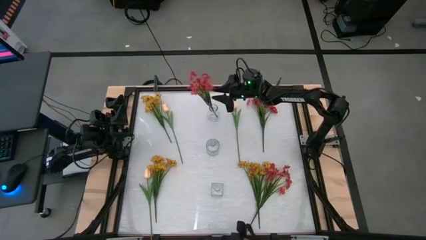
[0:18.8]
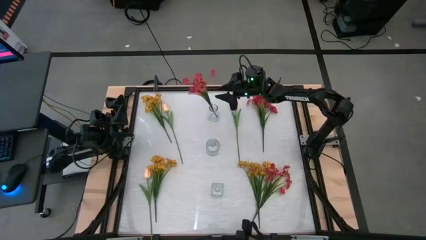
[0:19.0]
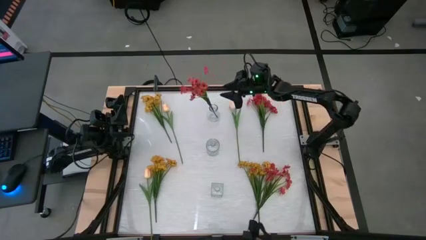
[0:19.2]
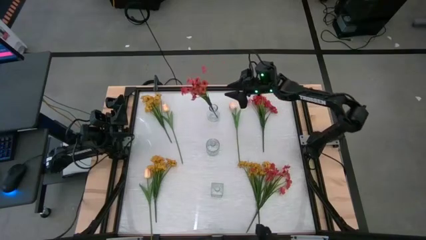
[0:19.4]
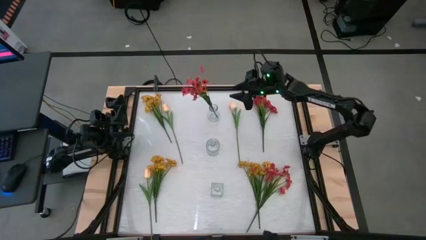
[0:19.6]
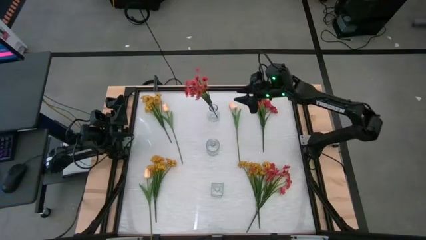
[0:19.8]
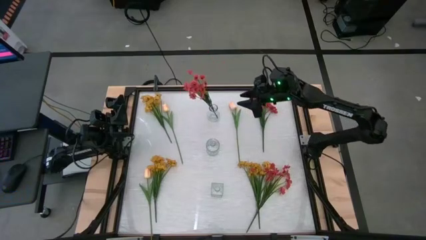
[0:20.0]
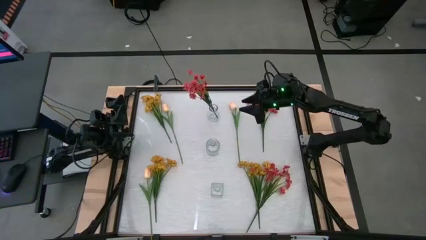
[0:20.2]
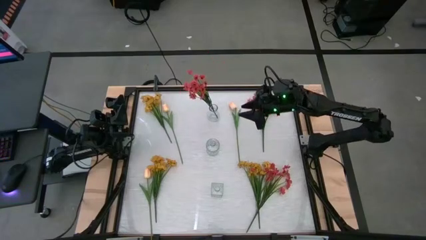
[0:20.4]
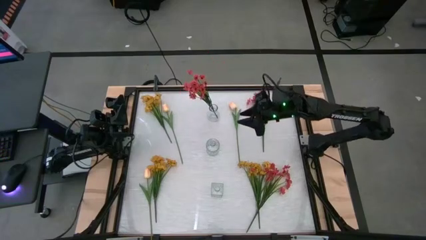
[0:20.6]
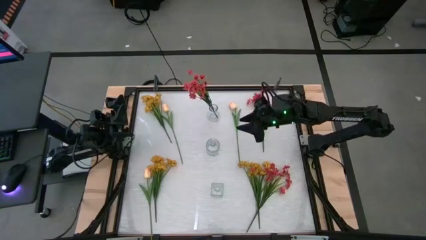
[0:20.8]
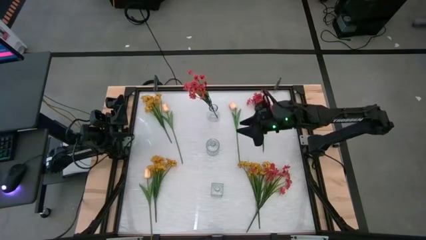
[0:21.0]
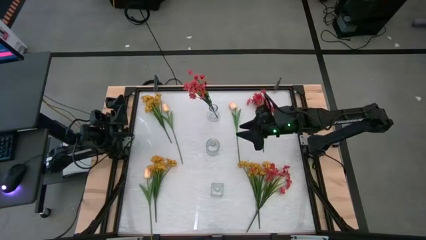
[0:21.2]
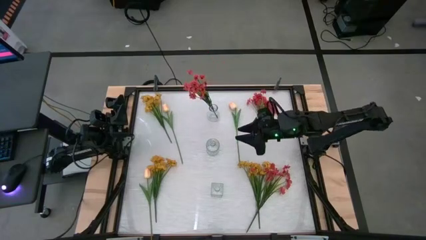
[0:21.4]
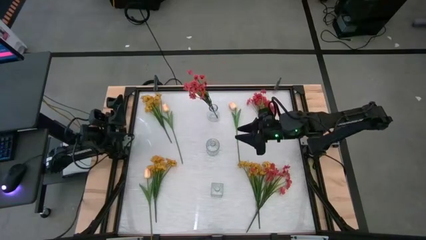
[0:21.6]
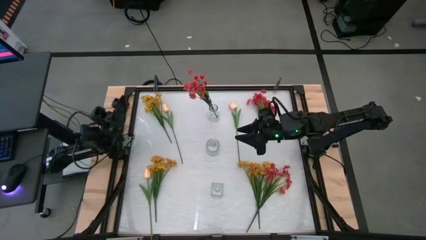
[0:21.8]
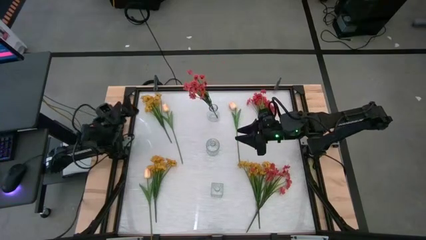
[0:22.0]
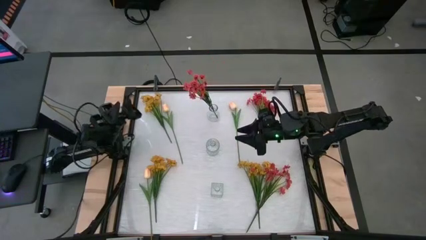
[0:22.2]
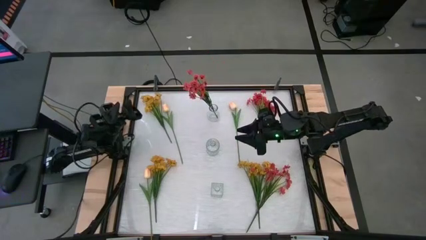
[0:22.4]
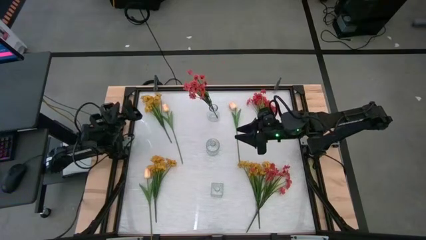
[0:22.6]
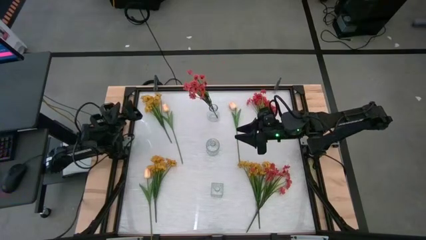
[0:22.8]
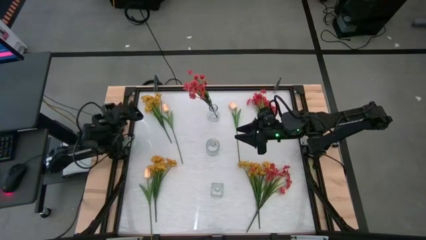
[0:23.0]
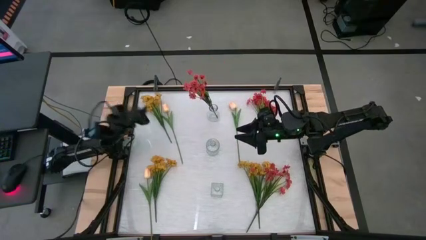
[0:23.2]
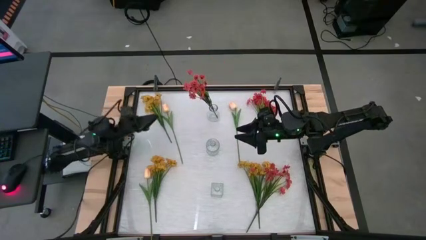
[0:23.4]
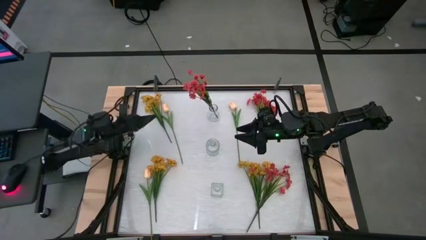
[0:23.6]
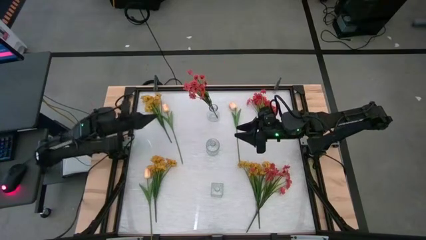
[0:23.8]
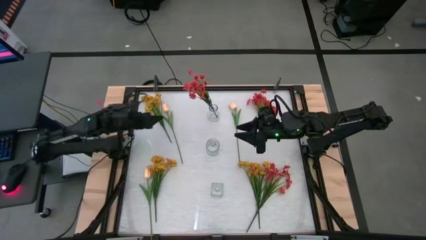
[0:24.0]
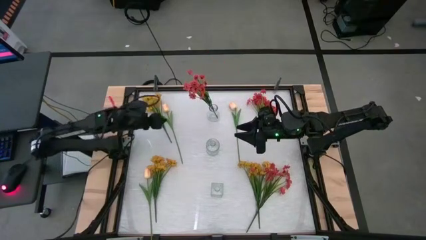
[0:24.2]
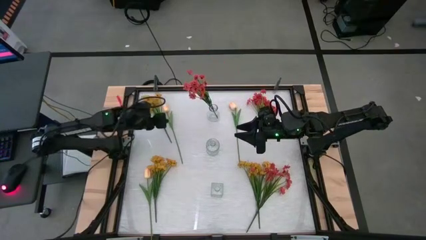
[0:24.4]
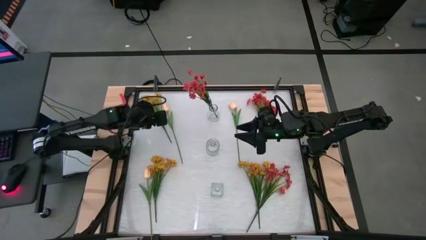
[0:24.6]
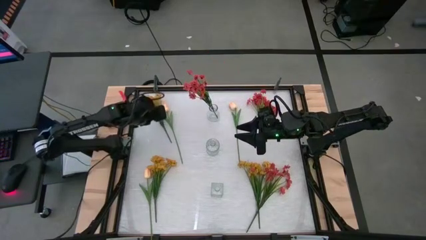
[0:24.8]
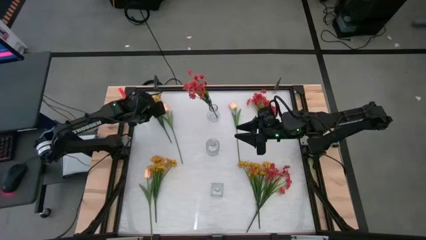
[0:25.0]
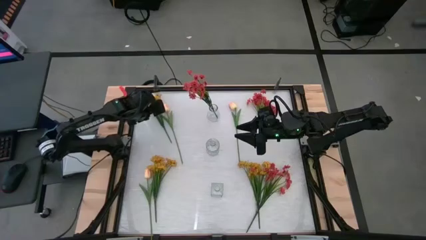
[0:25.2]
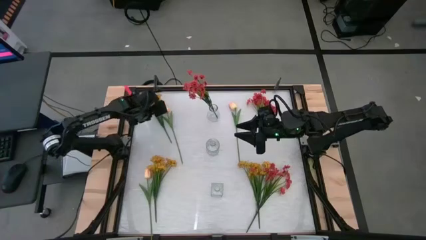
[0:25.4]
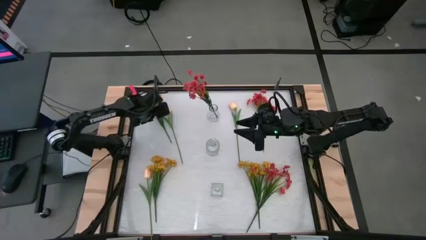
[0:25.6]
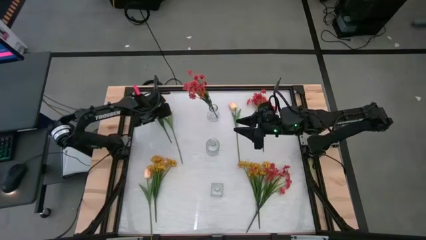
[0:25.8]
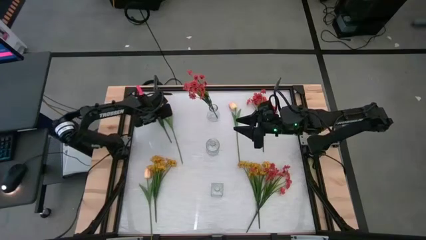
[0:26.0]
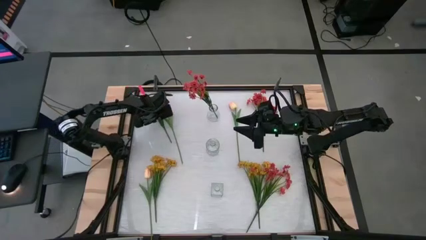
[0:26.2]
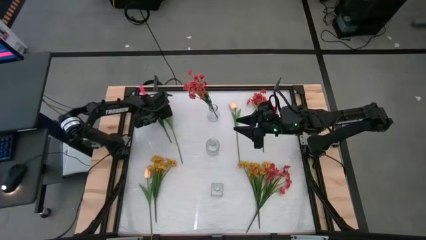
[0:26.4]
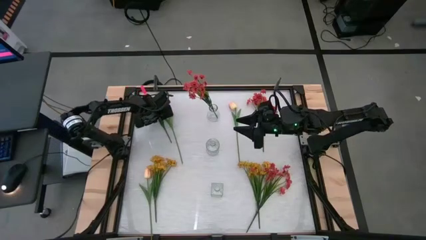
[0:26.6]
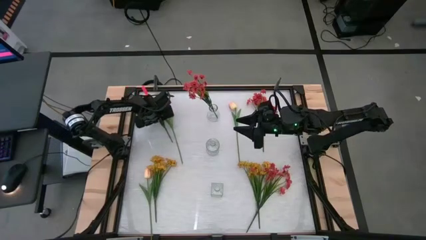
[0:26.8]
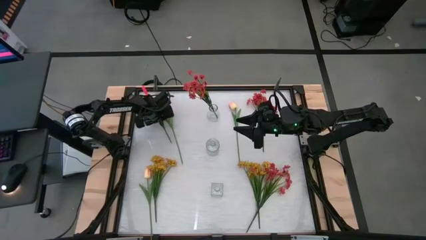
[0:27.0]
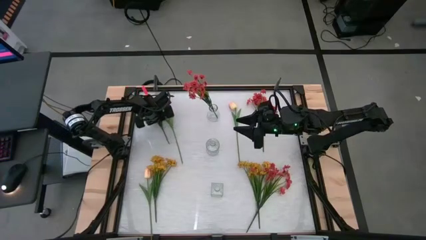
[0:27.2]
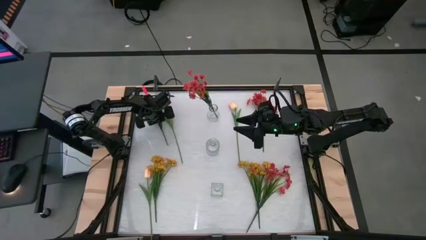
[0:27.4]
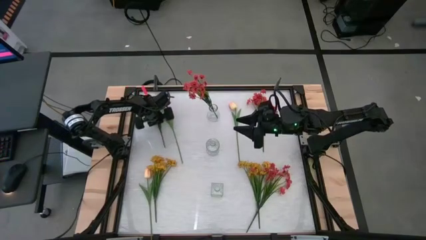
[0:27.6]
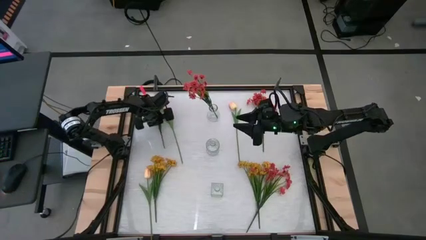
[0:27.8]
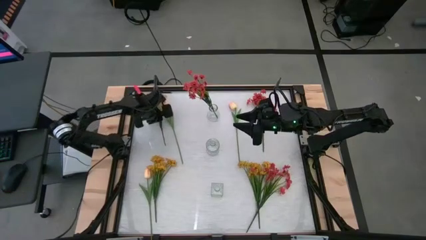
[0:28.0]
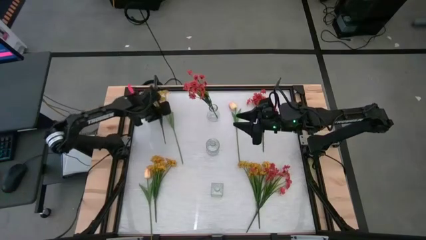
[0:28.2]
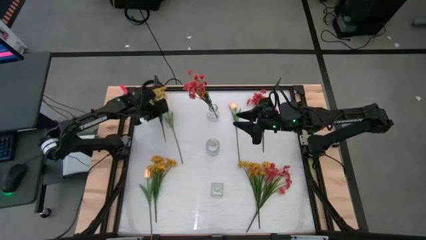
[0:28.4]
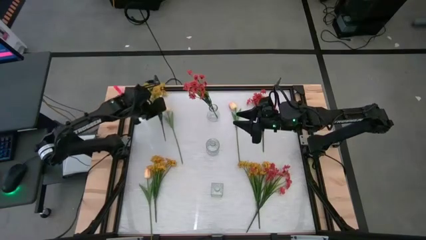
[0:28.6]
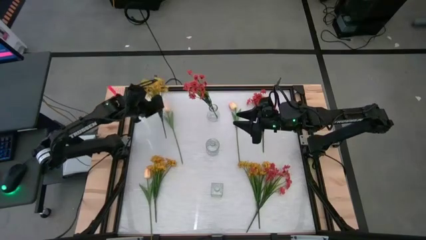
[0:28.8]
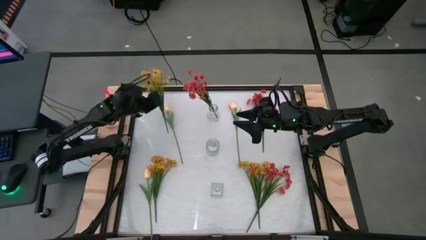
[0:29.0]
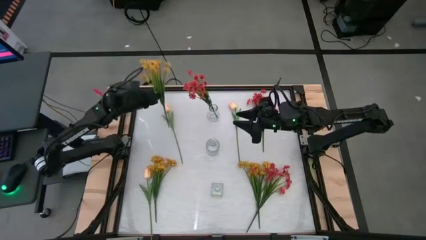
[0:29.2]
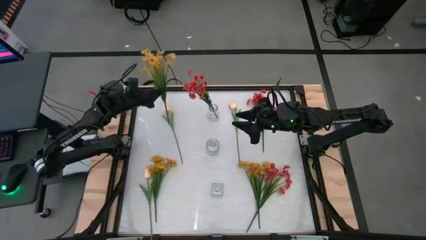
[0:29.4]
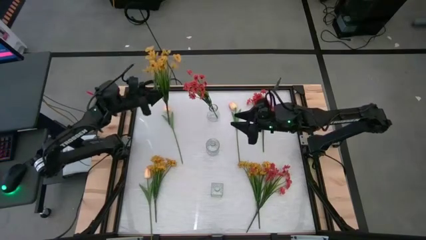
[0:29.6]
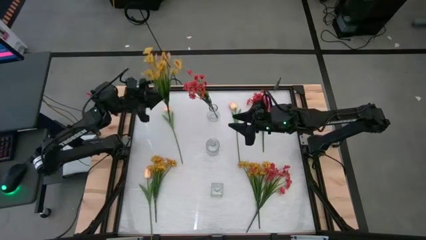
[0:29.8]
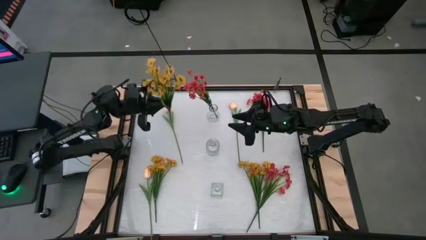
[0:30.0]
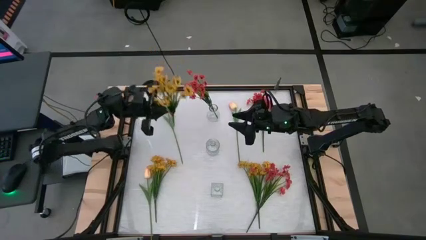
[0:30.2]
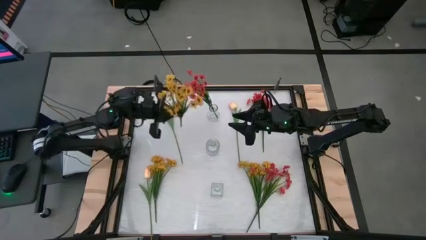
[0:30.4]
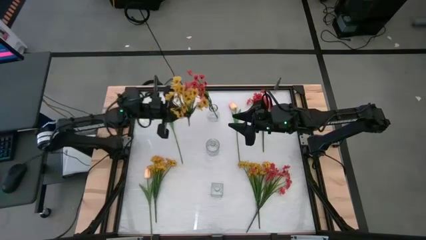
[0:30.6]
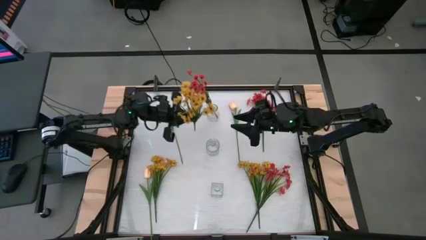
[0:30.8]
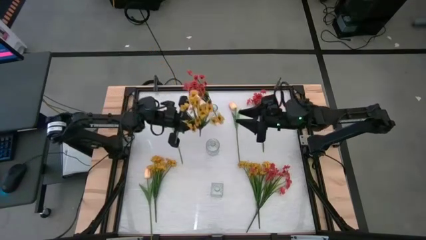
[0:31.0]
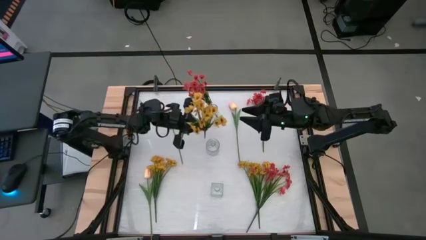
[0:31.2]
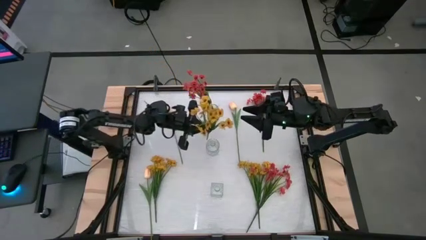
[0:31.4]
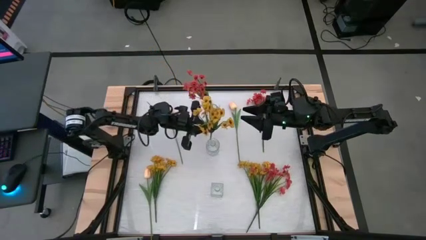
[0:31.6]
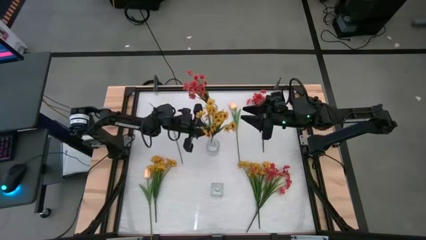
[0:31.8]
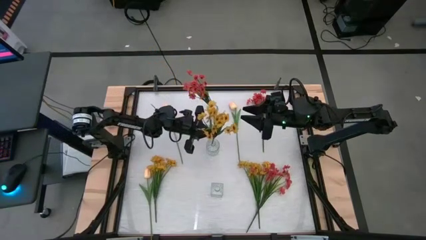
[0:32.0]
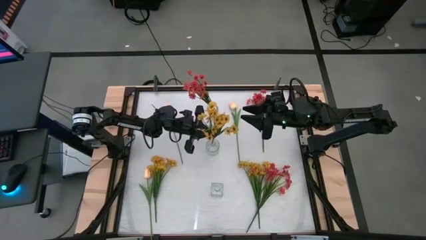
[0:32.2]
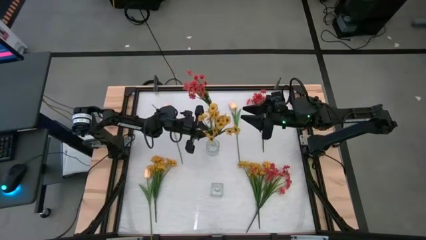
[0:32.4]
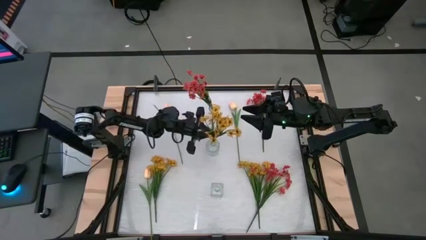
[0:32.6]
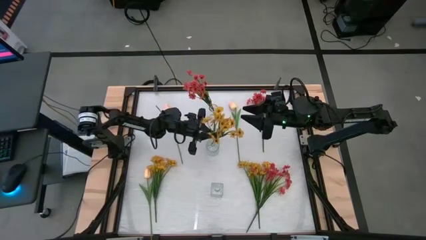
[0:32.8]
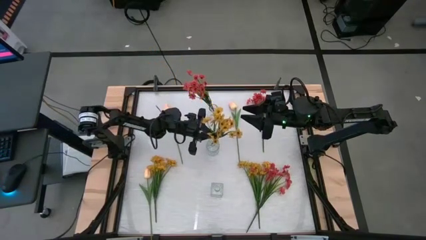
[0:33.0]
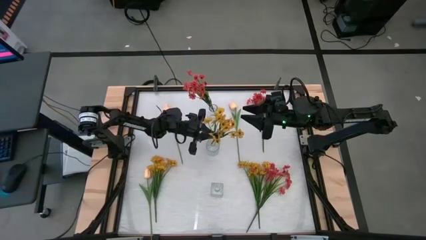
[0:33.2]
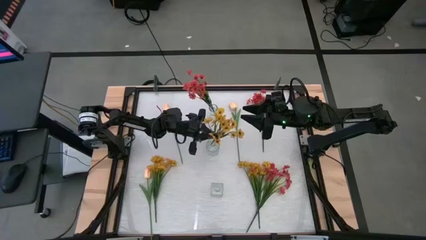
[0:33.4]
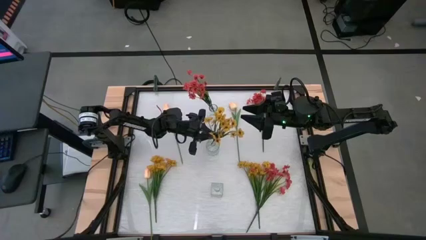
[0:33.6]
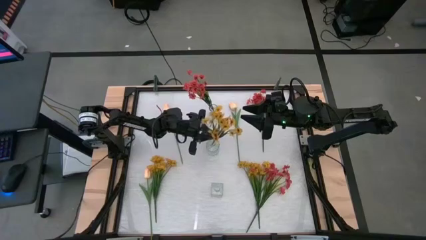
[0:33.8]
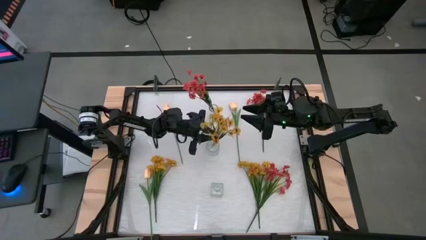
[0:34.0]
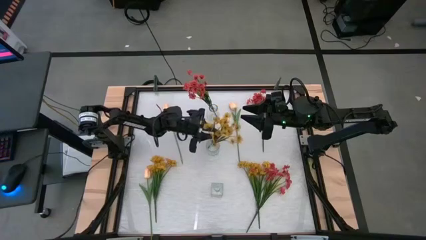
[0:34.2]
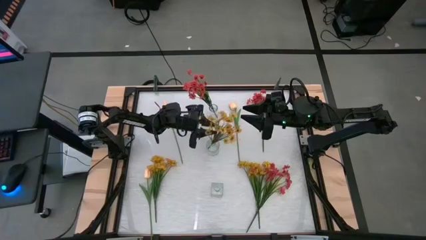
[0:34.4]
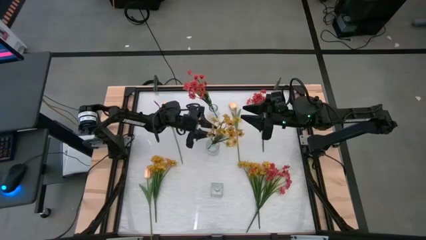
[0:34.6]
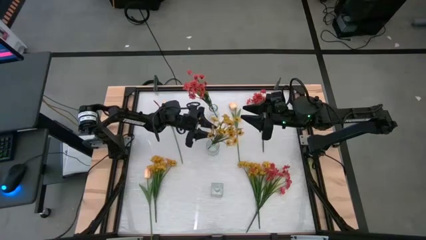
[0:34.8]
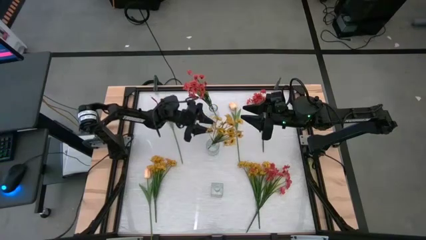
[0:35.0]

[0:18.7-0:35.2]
Task: Sort flowers into vase by color
Put the top yellow flowers into the middle transparent vase
